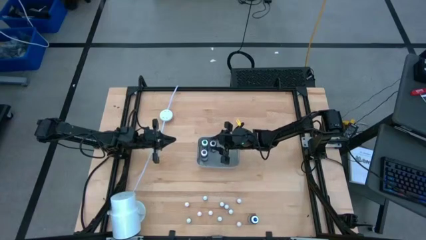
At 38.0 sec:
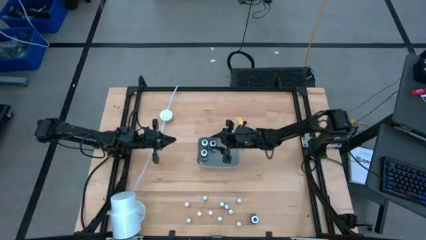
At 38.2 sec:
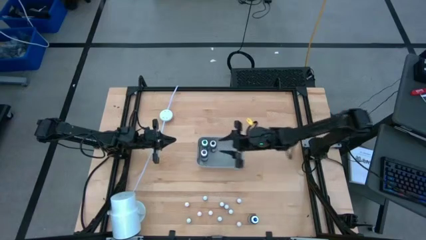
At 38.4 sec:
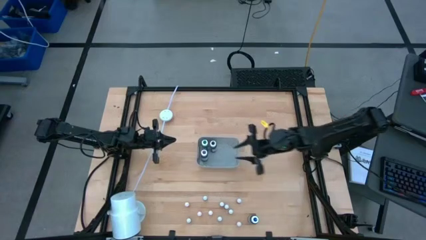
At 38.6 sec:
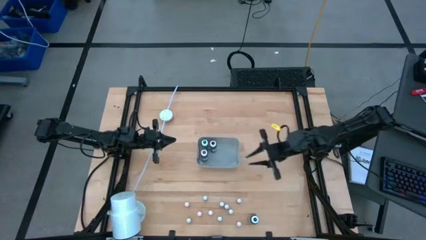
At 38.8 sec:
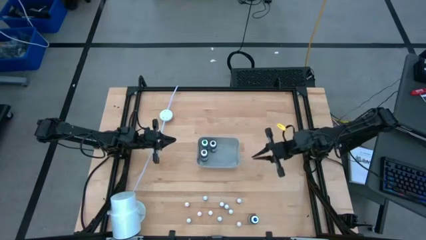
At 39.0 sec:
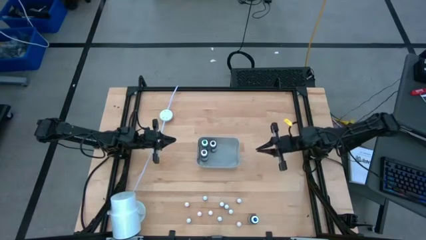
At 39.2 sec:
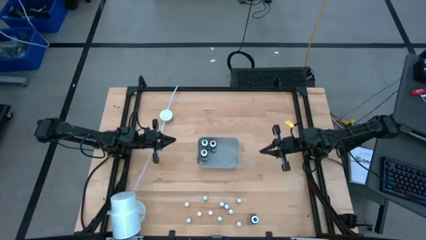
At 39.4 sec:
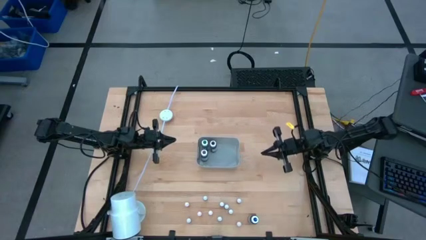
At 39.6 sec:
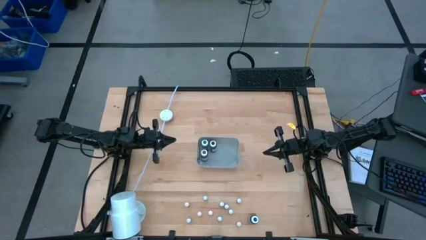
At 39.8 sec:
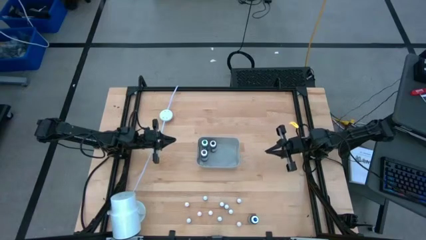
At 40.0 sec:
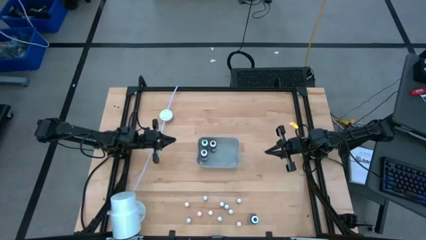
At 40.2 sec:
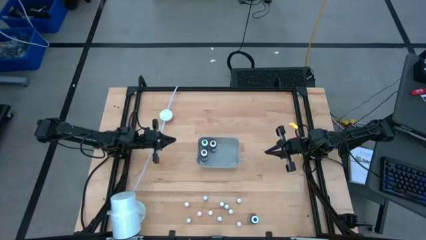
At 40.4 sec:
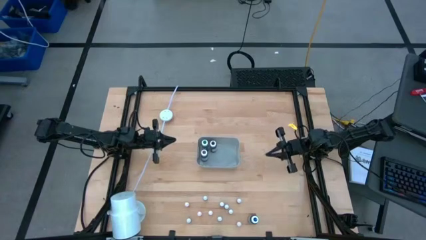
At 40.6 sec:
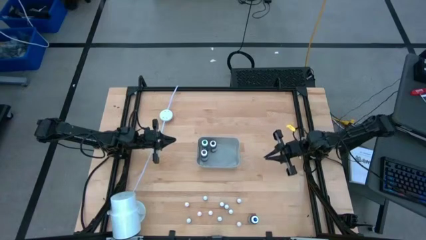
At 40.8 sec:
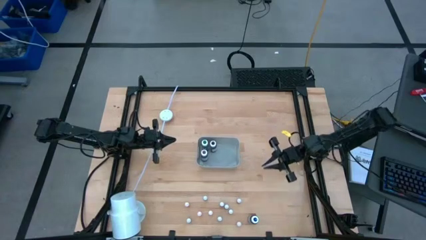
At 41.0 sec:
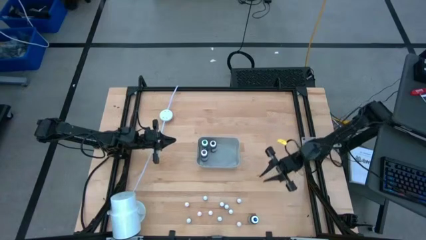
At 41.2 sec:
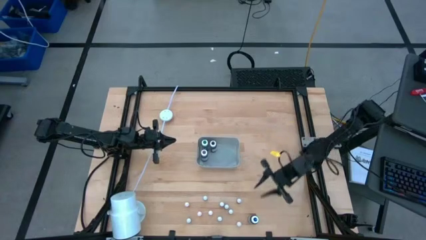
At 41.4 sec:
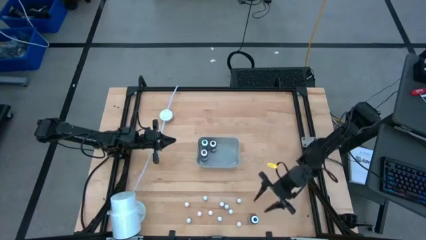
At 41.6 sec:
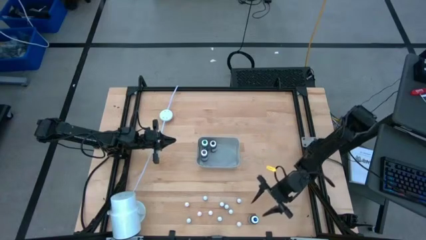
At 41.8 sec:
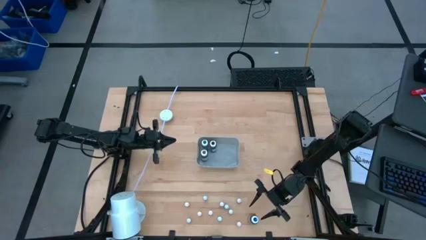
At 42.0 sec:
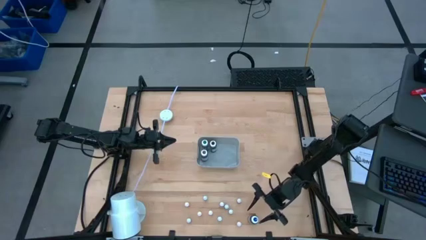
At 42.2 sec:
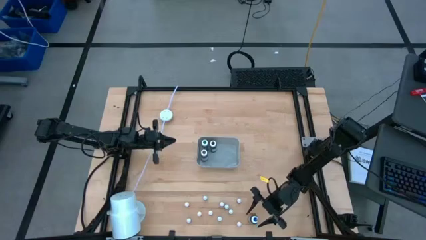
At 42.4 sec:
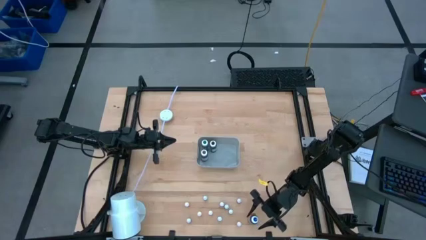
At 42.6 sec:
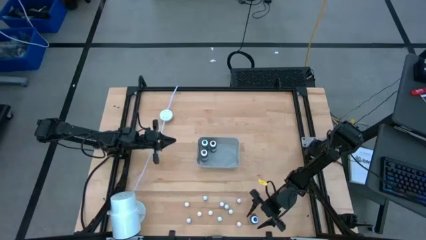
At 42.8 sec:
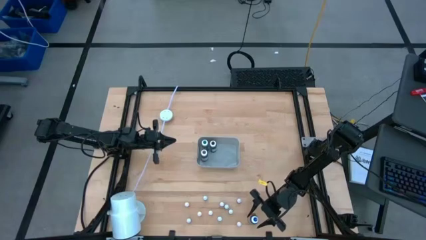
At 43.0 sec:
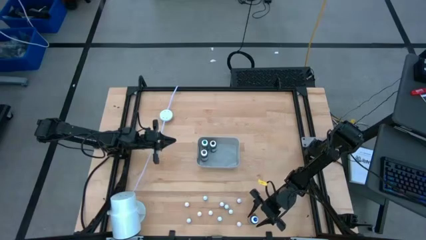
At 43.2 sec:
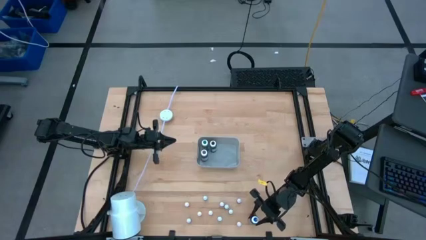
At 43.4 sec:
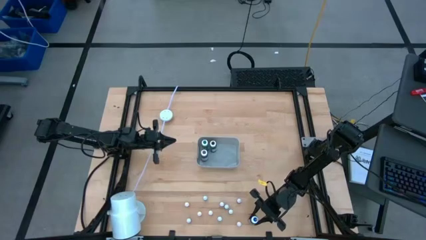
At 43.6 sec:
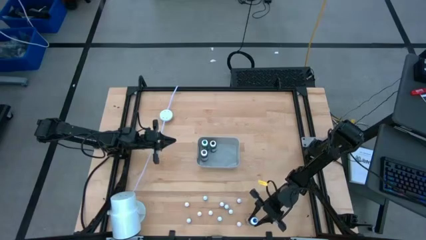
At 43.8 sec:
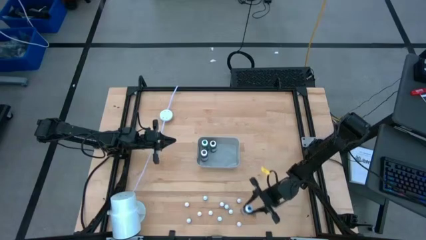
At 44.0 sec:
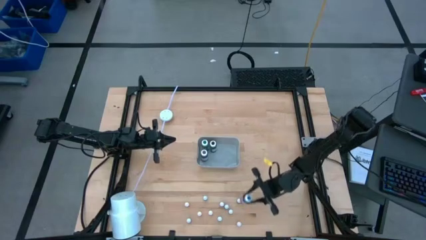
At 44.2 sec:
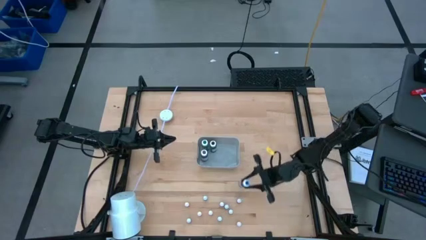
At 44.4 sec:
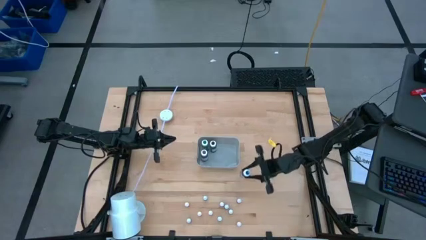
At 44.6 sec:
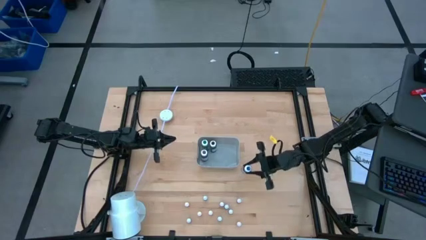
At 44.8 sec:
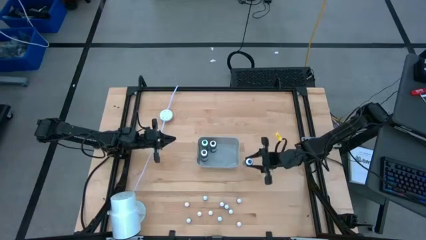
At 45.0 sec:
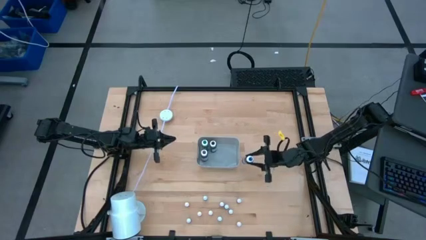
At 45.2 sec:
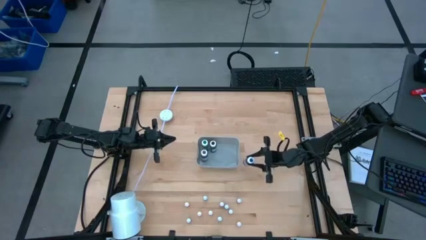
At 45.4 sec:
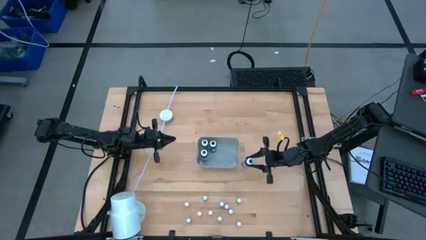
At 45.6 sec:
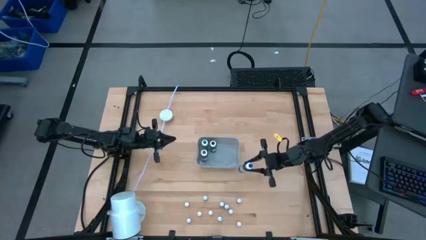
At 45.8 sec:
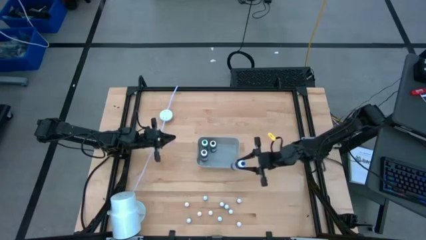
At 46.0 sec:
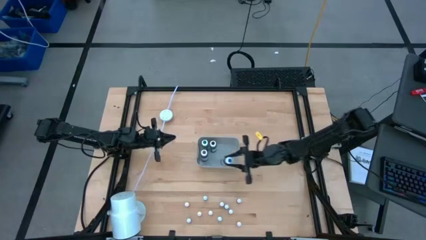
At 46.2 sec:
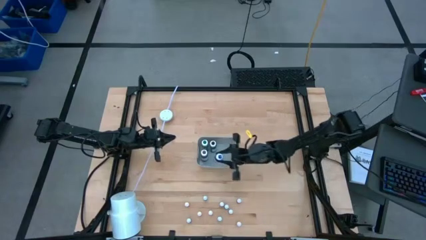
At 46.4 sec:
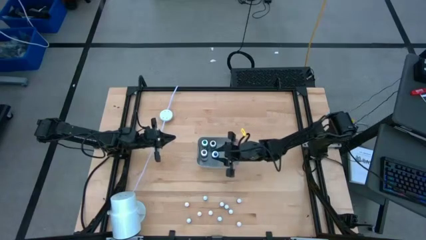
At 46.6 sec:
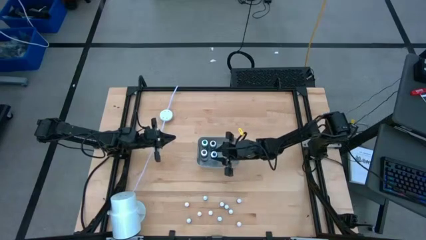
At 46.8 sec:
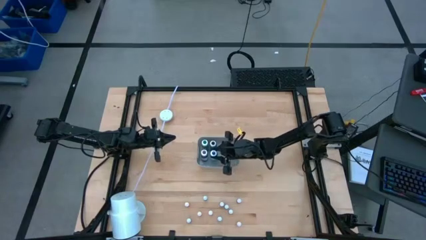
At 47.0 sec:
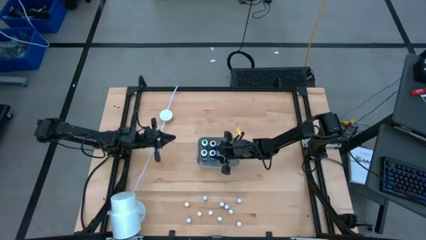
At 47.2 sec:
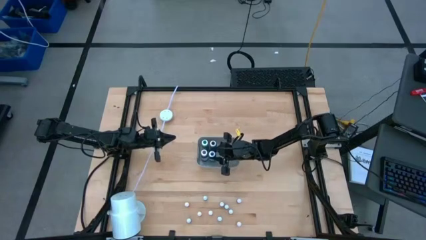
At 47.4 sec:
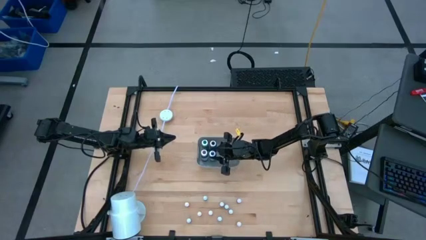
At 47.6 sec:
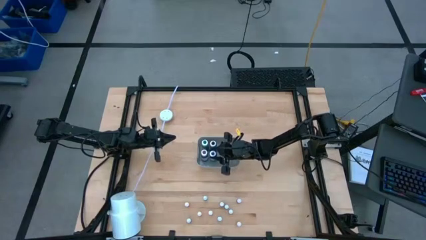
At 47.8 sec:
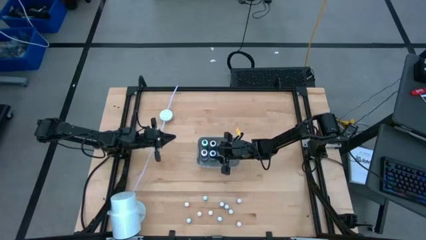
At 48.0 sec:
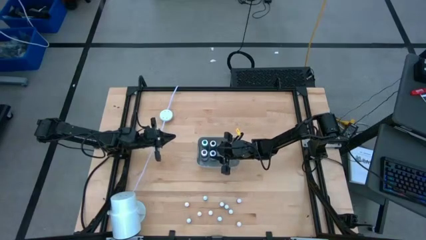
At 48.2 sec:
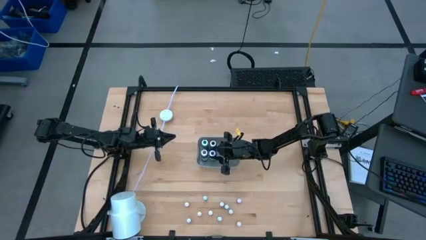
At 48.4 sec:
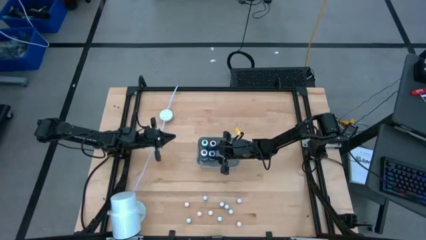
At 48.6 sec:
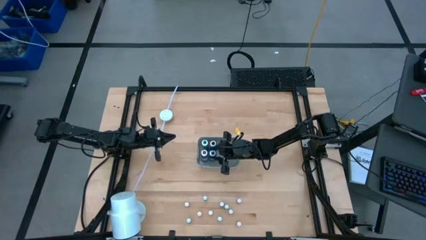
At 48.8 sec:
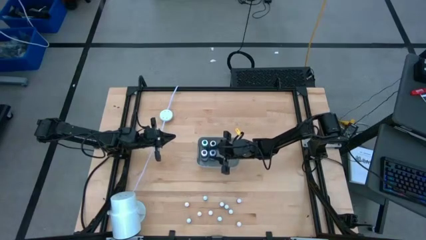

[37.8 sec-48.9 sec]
Task: Pick & Place food coloring
Put the large blue food coloring bottle into the gray container

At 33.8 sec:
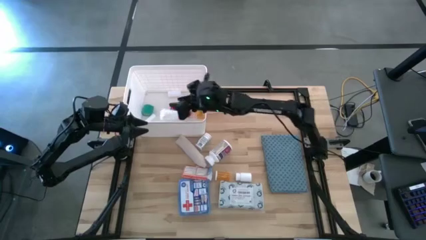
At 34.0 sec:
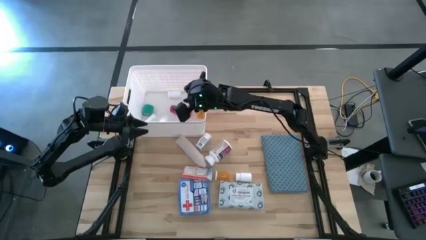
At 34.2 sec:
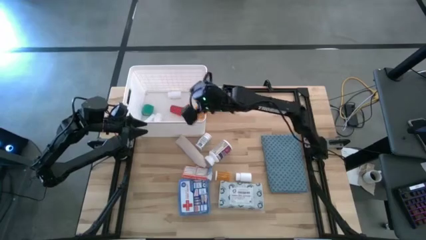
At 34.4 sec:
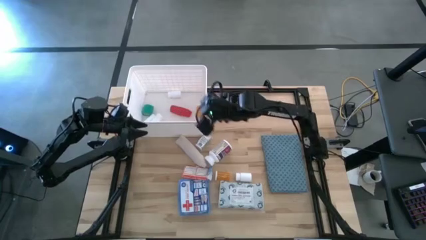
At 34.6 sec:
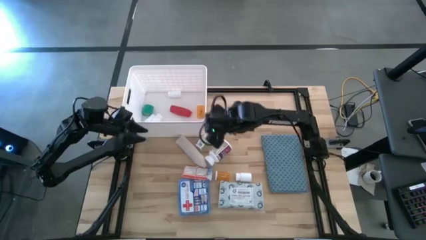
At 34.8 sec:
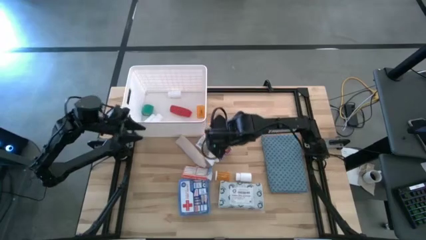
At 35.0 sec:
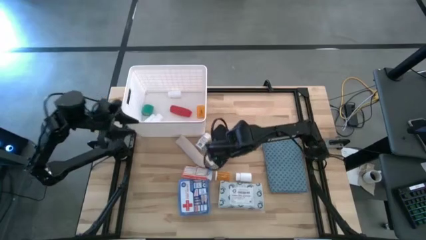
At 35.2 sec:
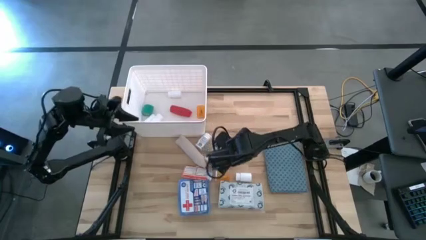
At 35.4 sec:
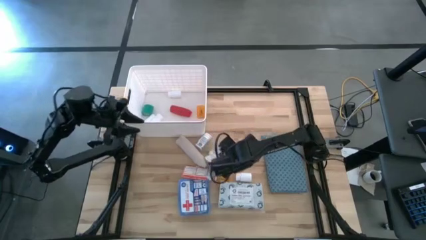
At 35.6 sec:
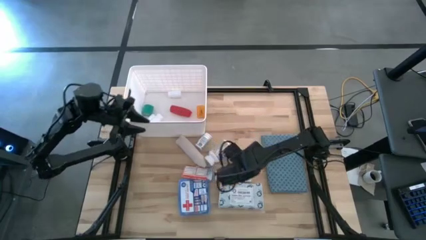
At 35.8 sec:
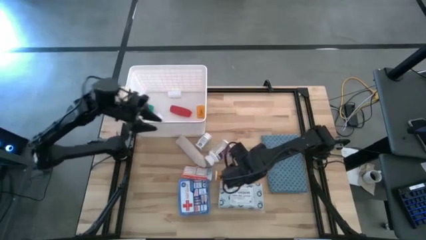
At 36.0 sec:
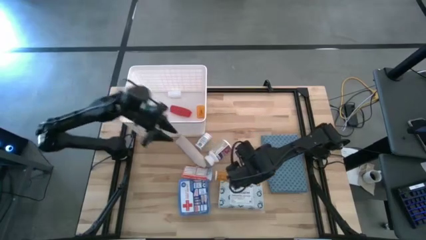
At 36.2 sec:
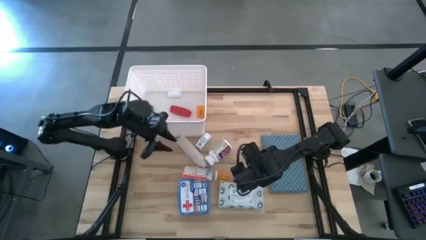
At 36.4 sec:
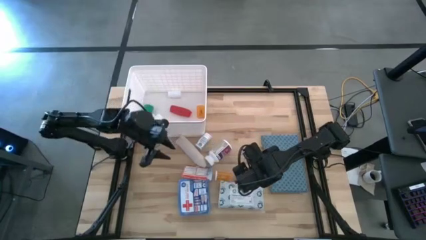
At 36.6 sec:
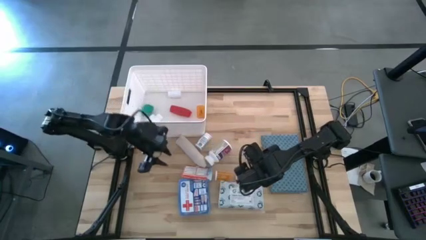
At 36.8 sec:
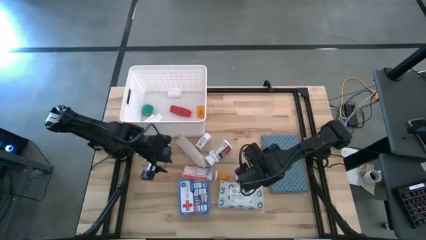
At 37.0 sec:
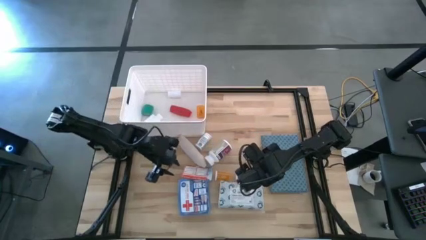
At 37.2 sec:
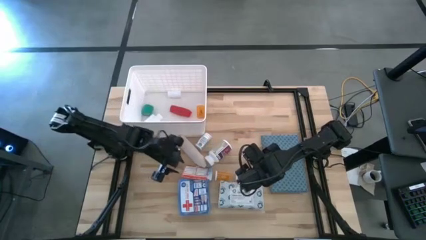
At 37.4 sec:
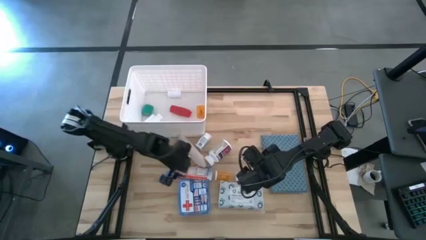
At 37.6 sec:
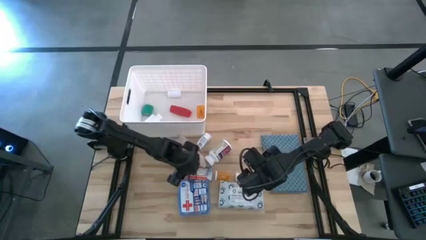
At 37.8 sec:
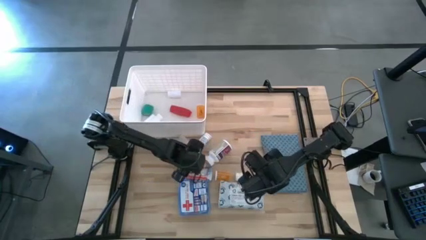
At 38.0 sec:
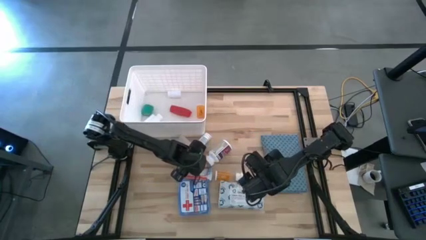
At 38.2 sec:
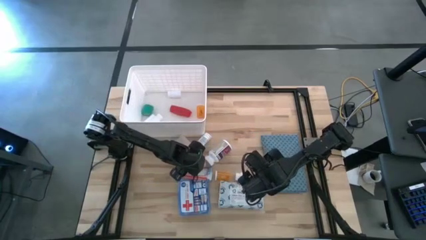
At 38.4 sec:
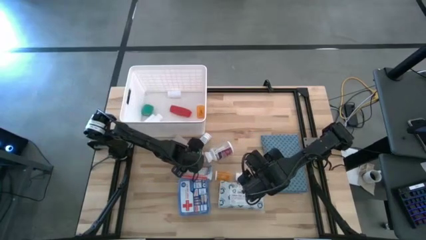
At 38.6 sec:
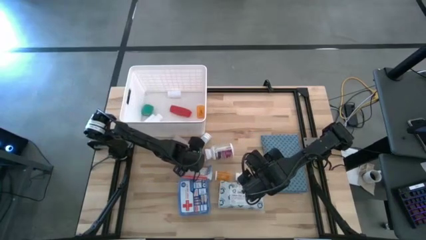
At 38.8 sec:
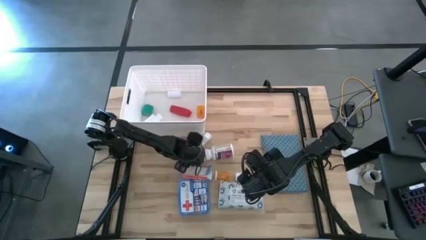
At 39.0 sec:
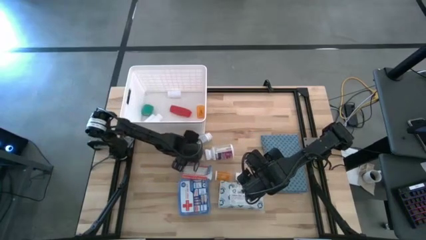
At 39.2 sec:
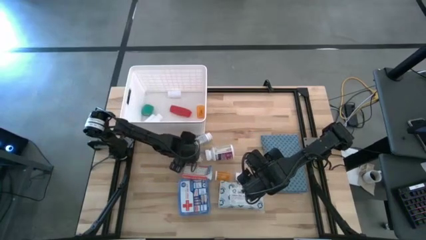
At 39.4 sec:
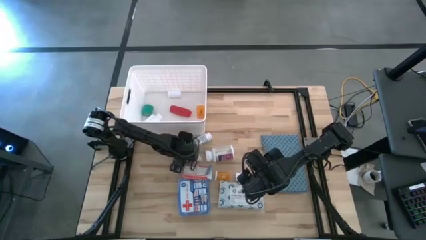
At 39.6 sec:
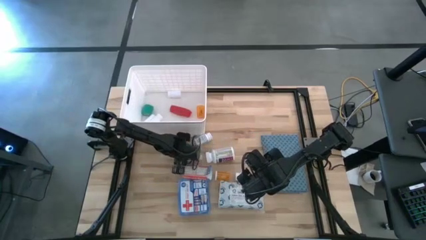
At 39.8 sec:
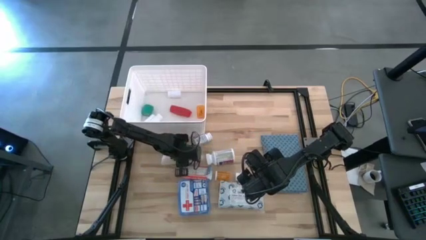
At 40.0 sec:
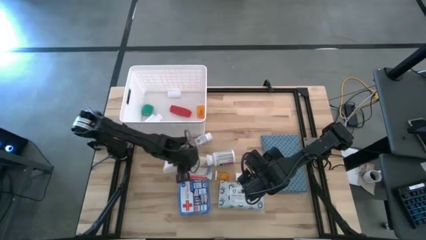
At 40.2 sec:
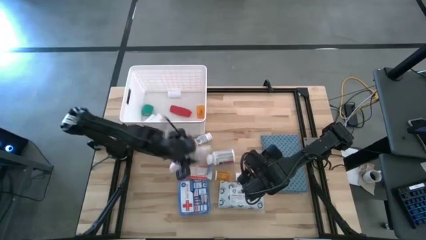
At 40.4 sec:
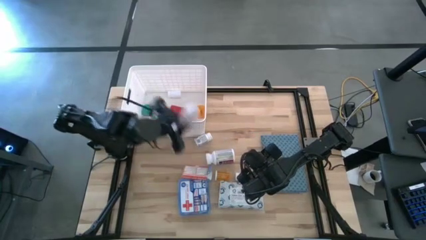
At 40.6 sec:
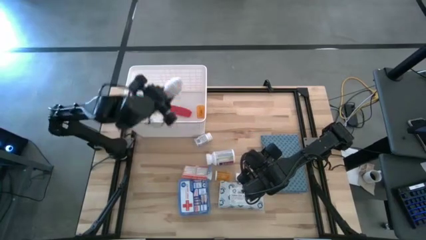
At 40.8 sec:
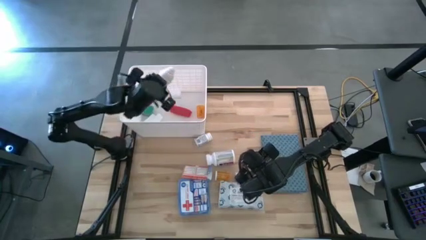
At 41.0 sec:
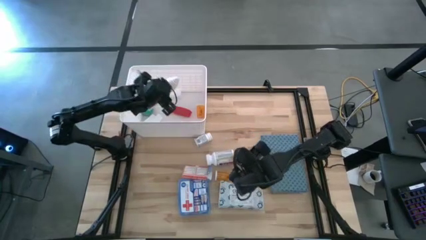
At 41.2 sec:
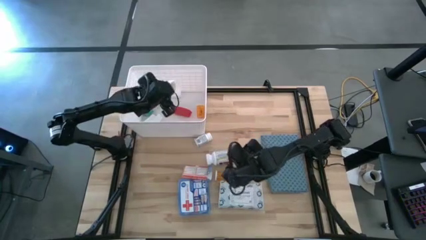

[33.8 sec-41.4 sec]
Task: Pick & place medical supplies in basket/bin
Put the light brown bandage into the white bin
